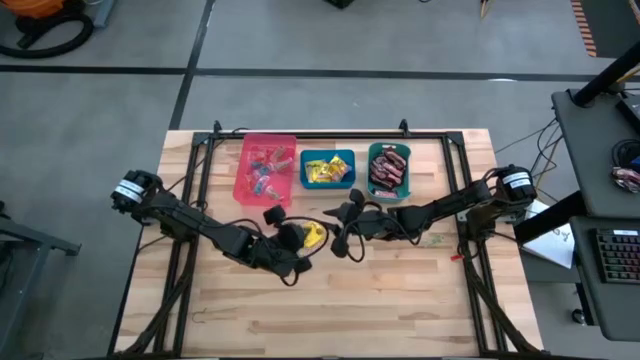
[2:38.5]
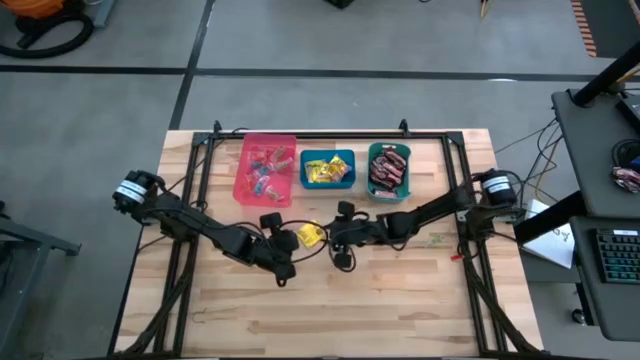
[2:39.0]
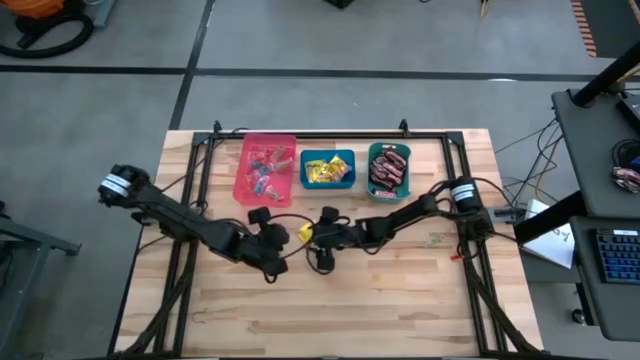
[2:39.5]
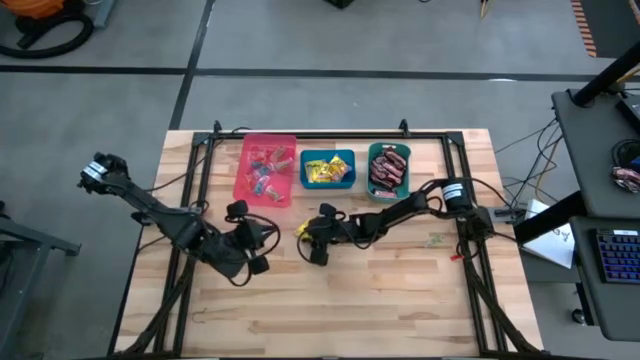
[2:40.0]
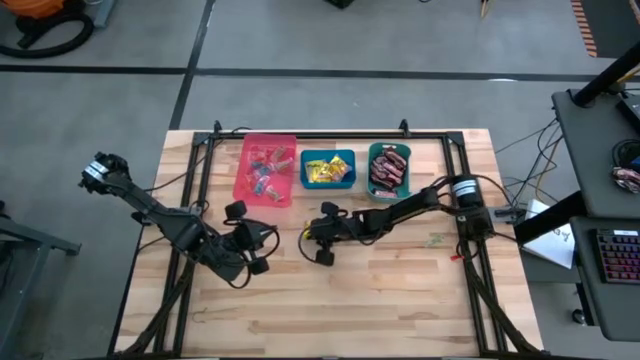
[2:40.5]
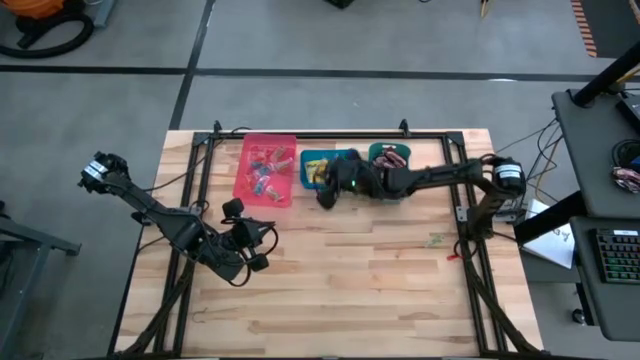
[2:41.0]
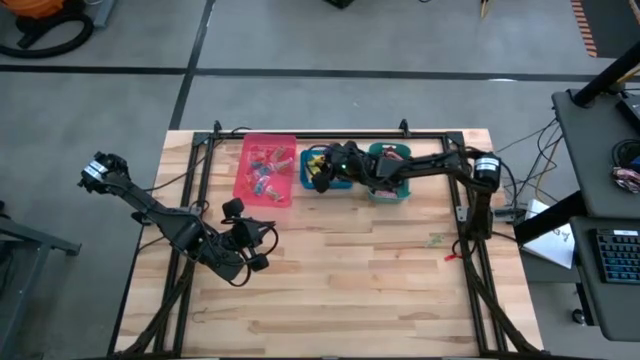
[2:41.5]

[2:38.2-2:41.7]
Task: Sort candy
Put the yellow candy into the blue bin

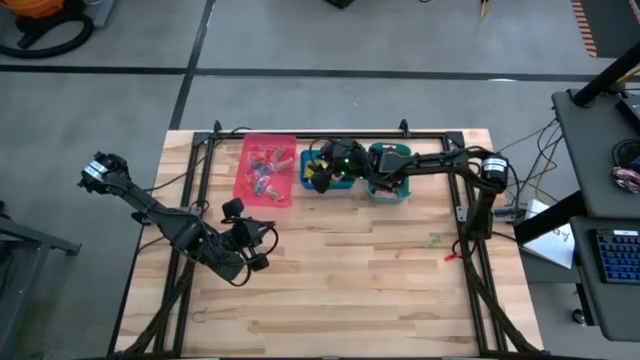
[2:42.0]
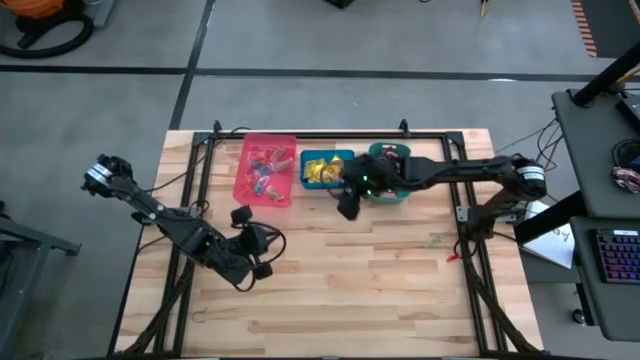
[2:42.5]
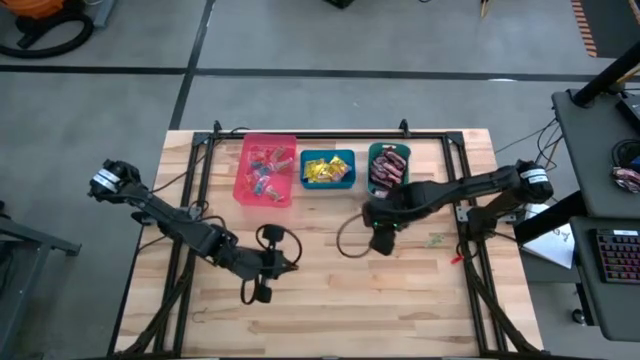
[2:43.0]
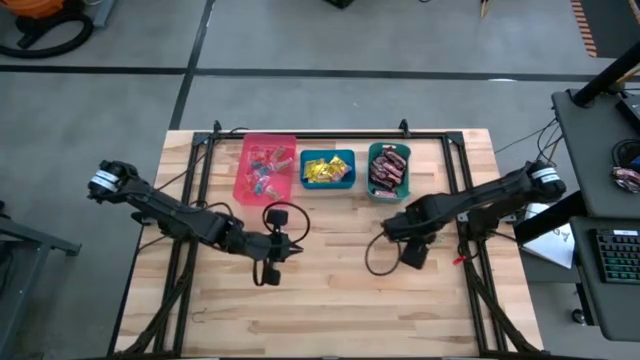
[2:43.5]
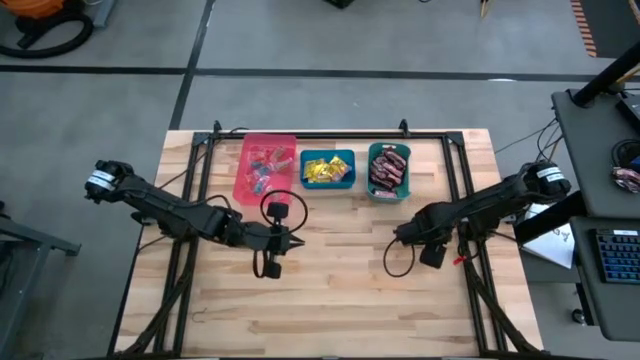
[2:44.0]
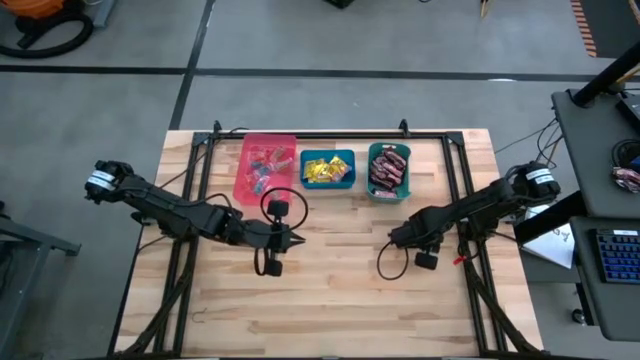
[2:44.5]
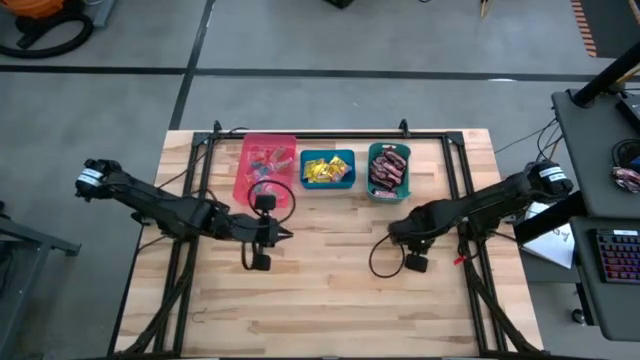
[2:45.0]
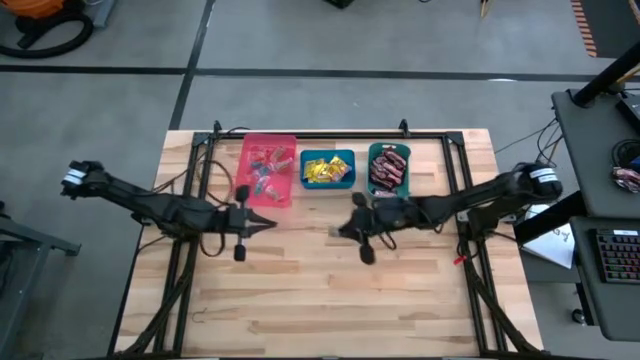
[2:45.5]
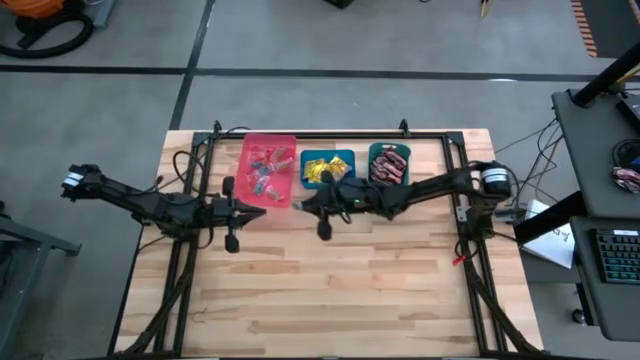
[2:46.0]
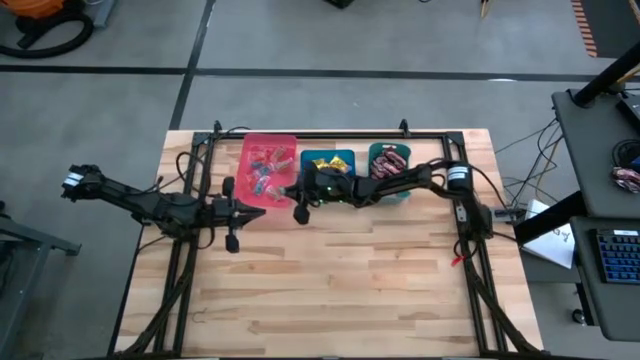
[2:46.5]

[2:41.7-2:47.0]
Put the green candy into the pink bin

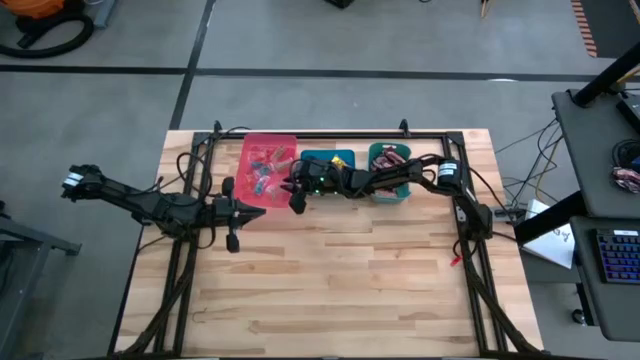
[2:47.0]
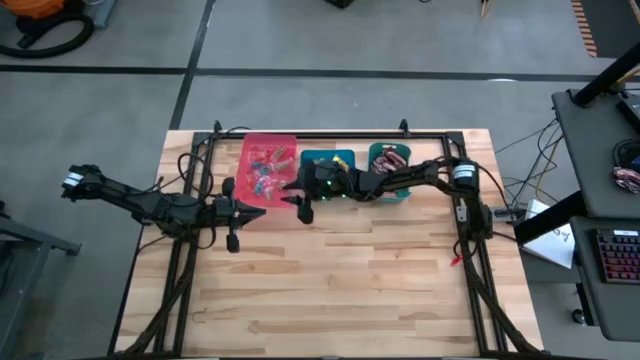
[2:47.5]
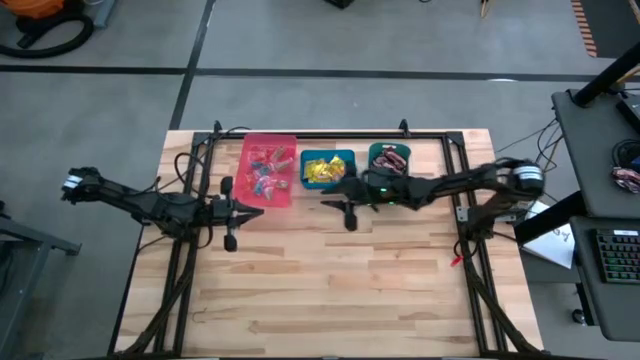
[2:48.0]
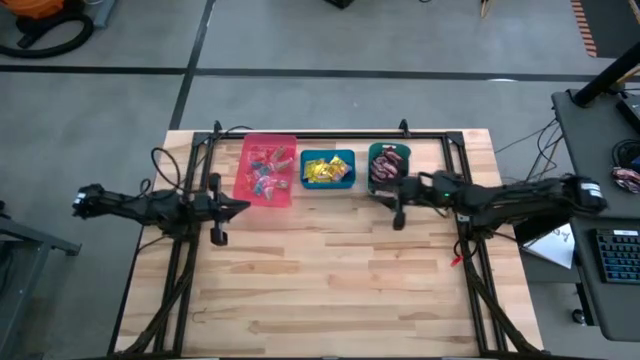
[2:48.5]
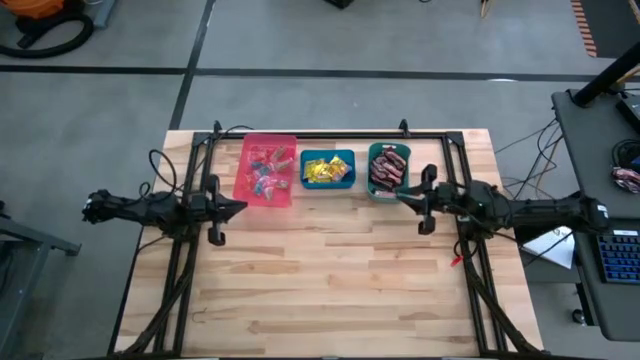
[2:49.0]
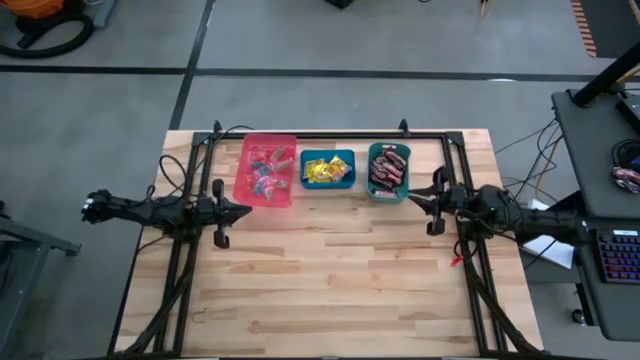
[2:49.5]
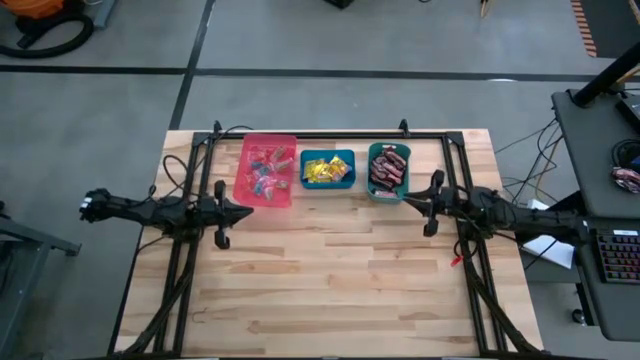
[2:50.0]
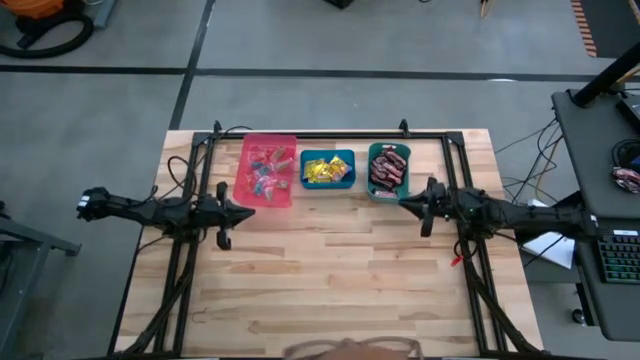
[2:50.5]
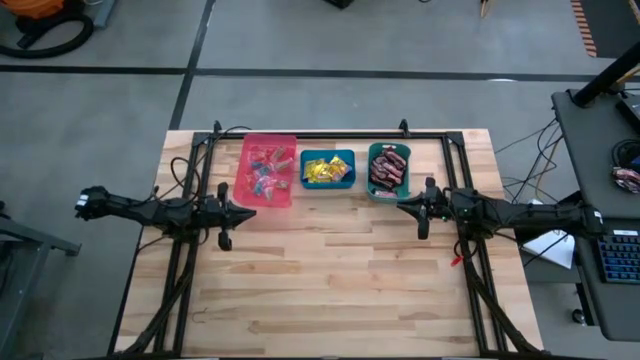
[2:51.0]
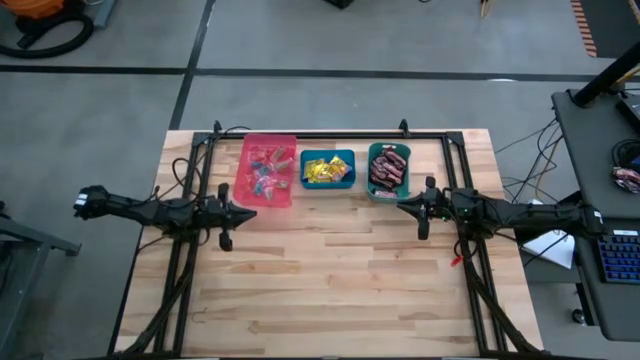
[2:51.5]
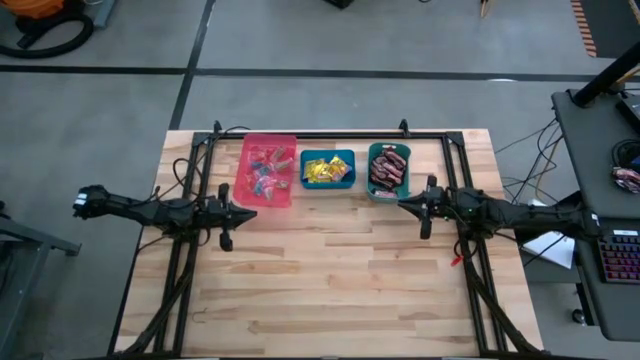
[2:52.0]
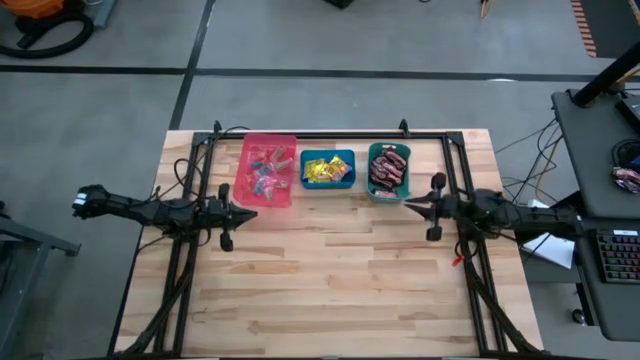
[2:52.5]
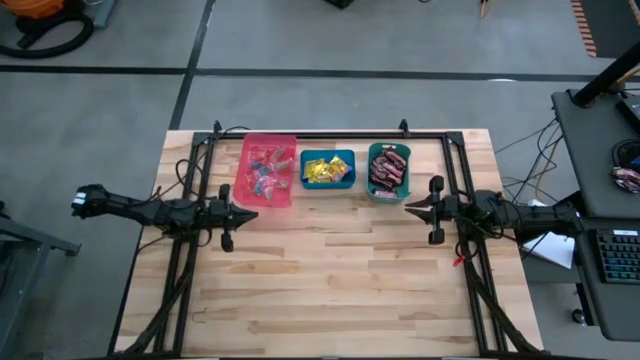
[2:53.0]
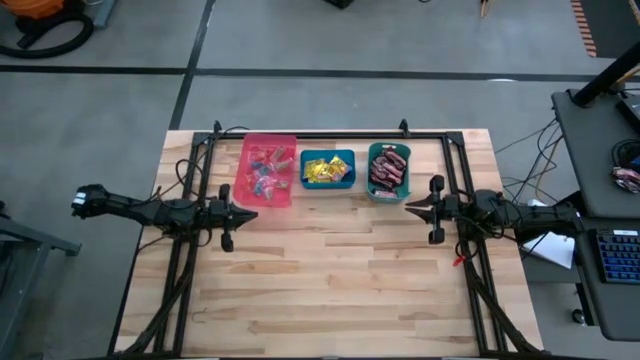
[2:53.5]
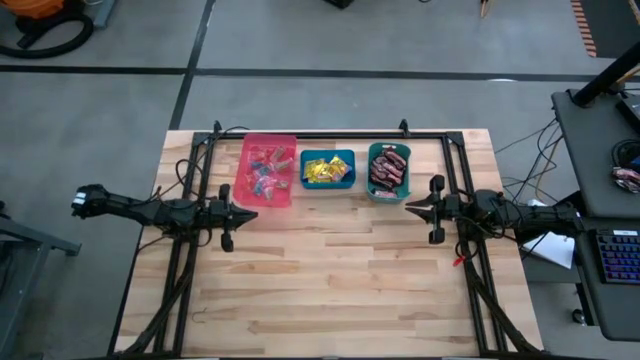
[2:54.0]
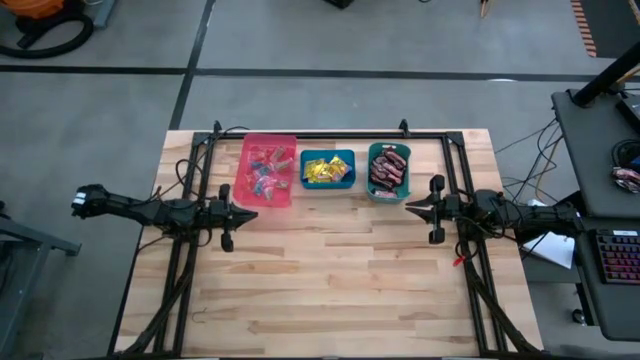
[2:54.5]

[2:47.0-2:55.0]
Return to Home Position

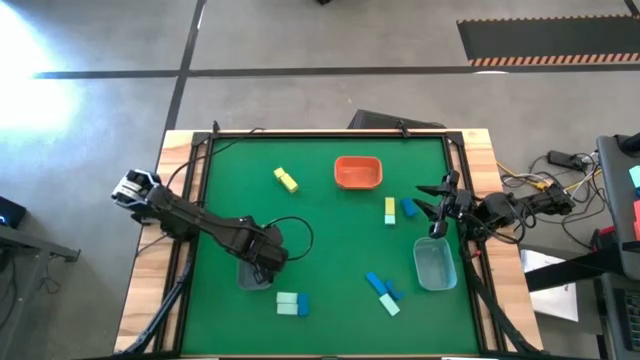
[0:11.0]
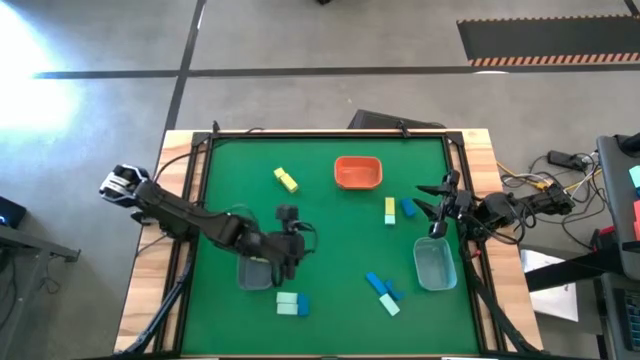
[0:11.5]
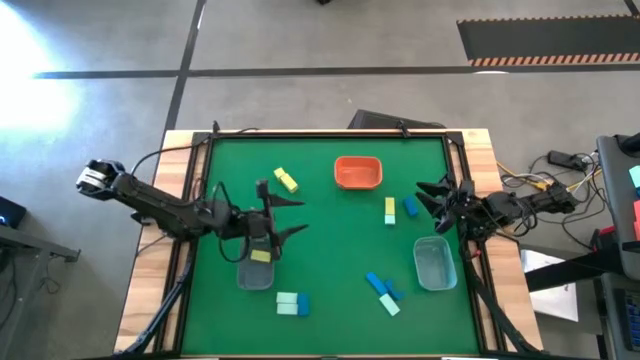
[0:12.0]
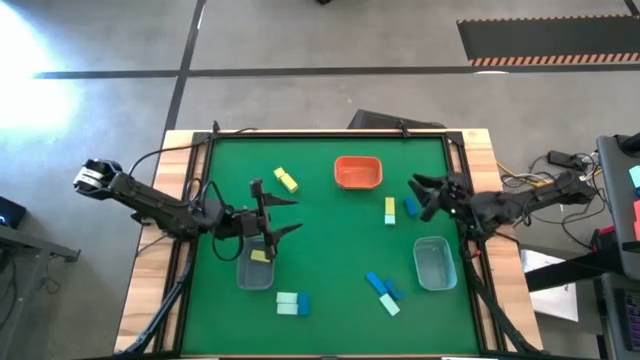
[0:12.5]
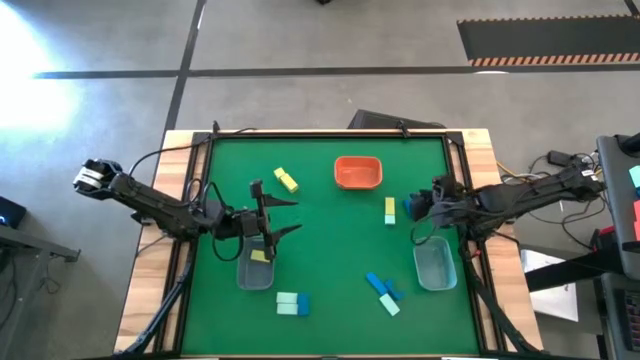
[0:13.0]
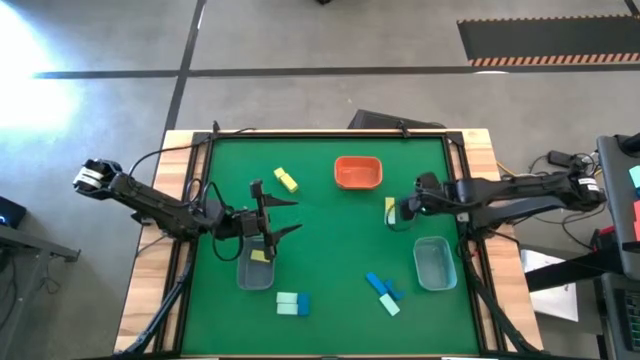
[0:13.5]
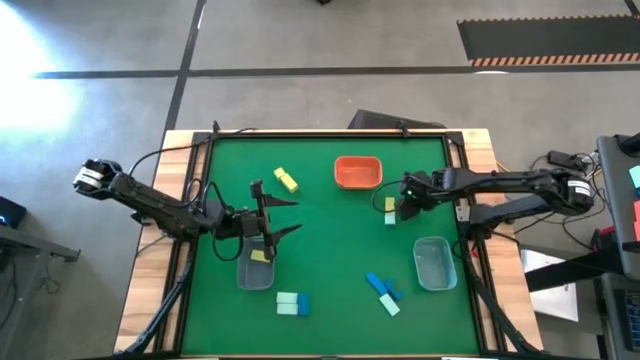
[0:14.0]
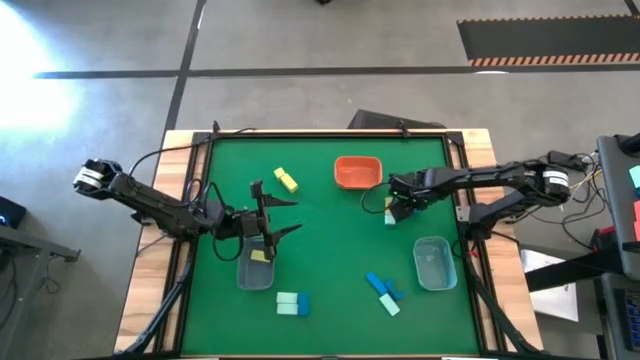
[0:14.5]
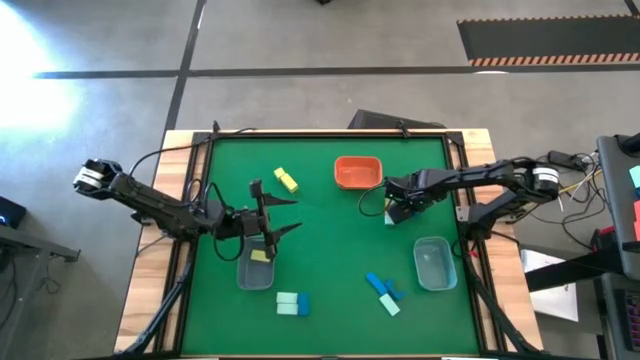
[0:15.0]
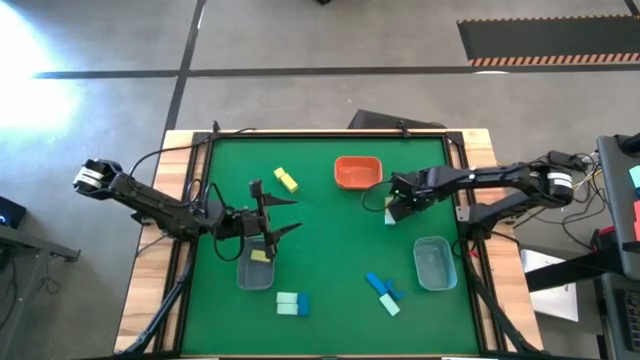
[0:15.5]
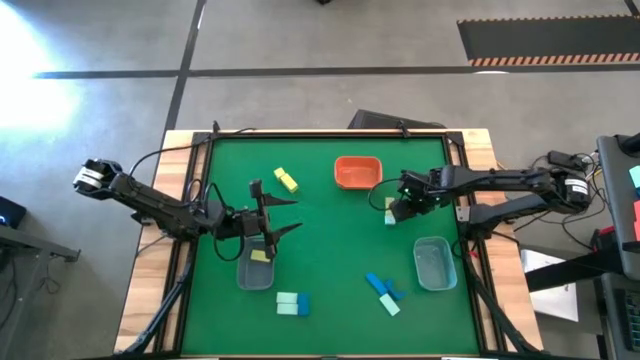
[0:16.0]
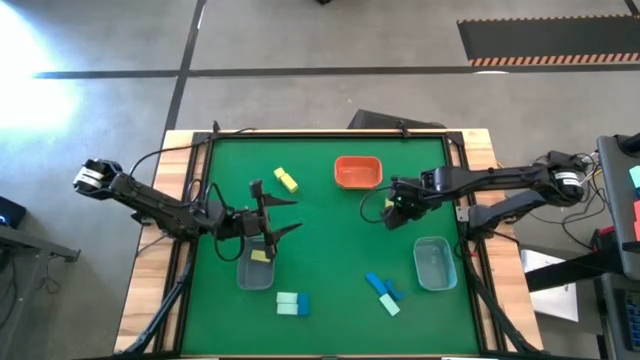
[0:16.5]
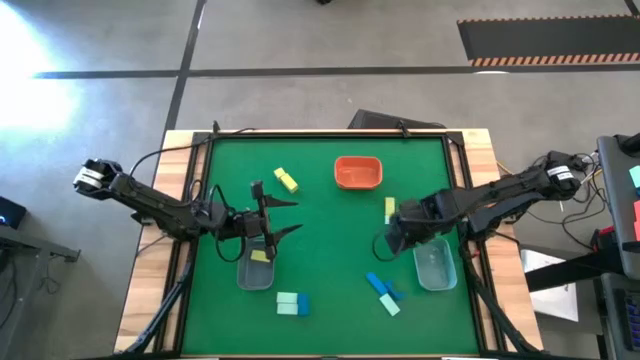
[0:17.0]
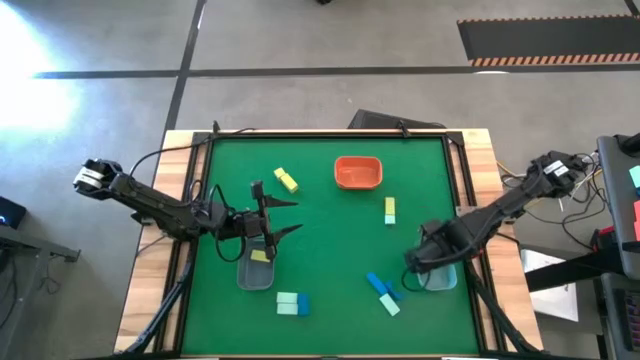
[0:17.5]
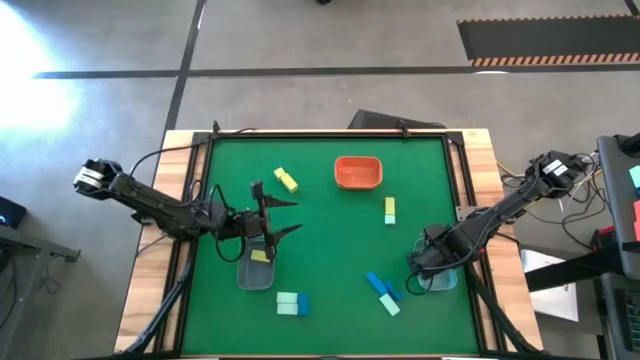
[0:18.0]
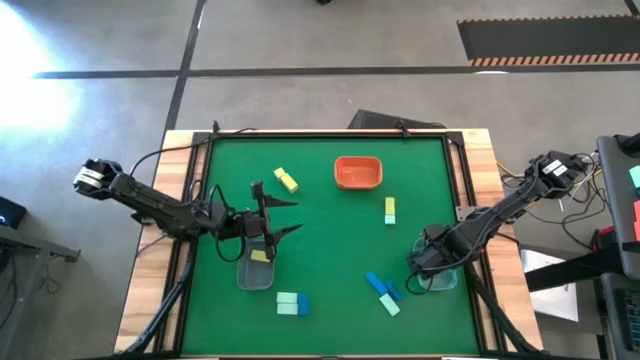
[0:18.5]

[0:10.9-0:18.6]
Task: Sort & place blocks by color
Put the blue block into the light blue bin
